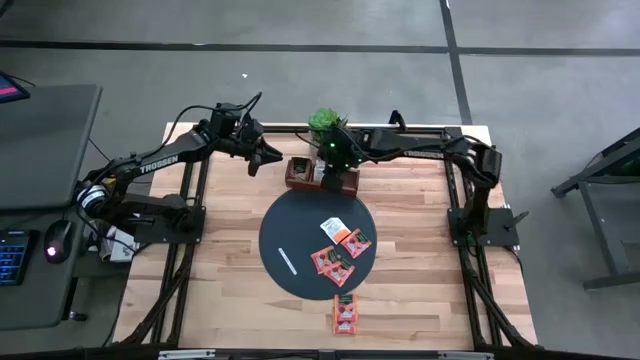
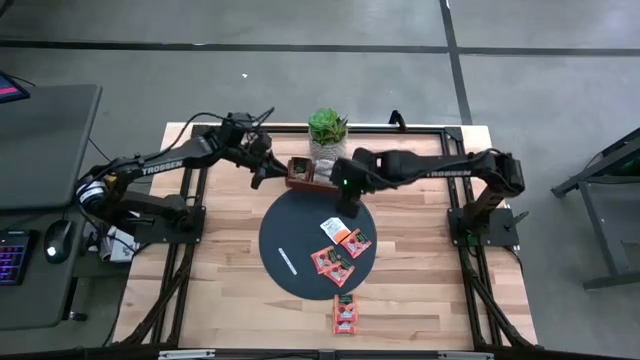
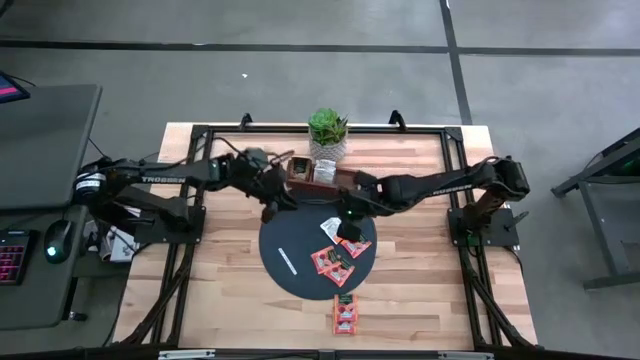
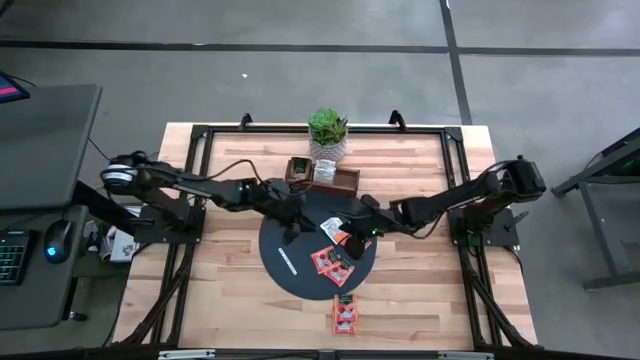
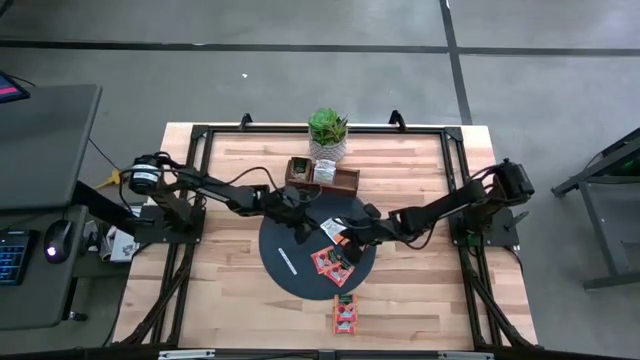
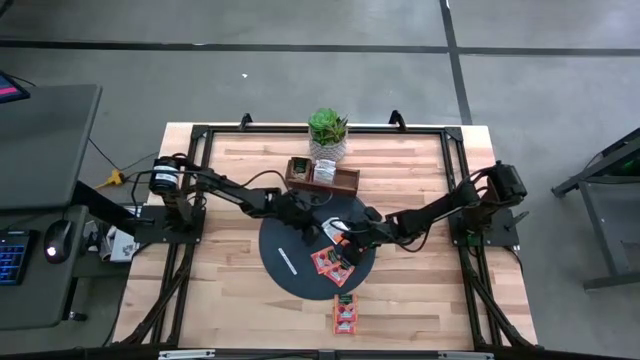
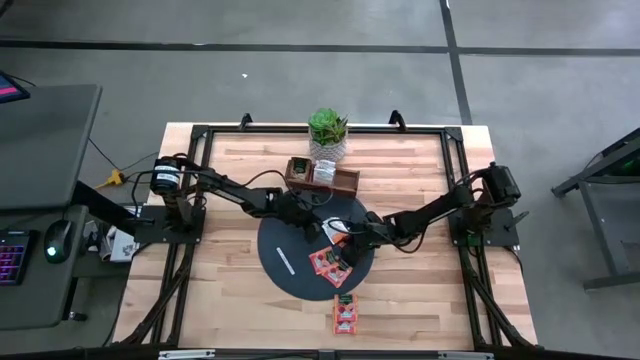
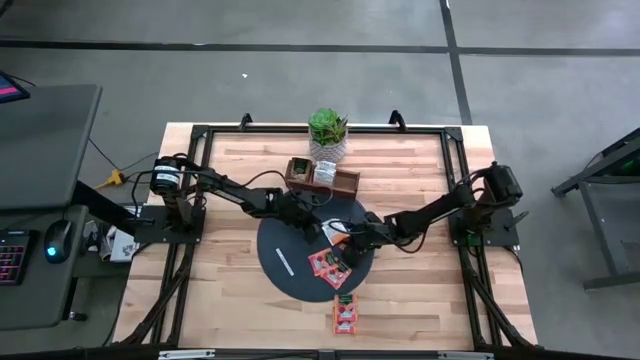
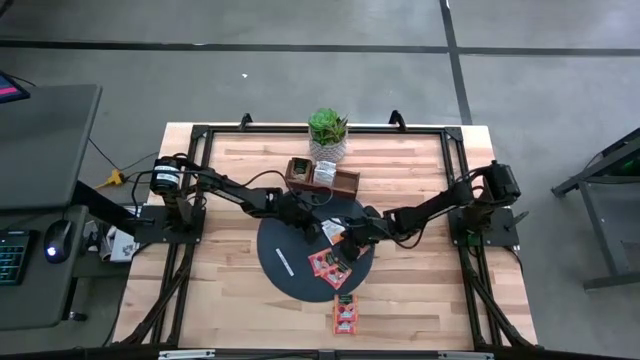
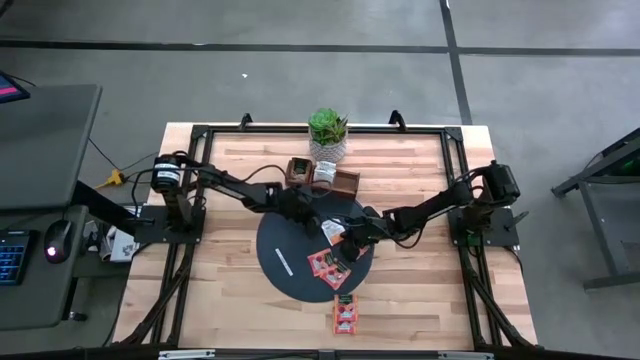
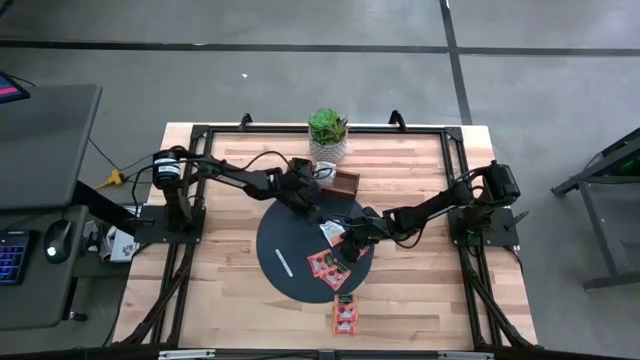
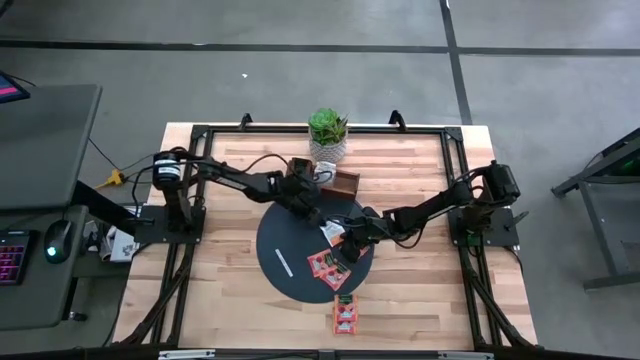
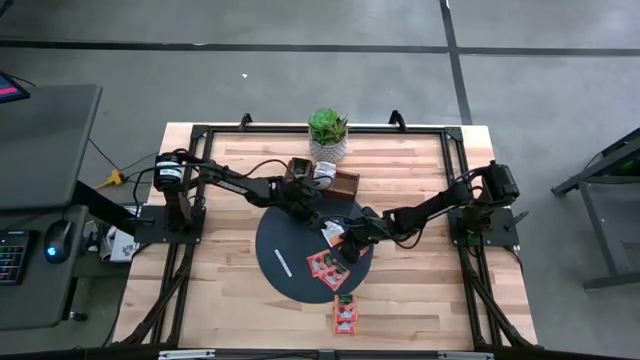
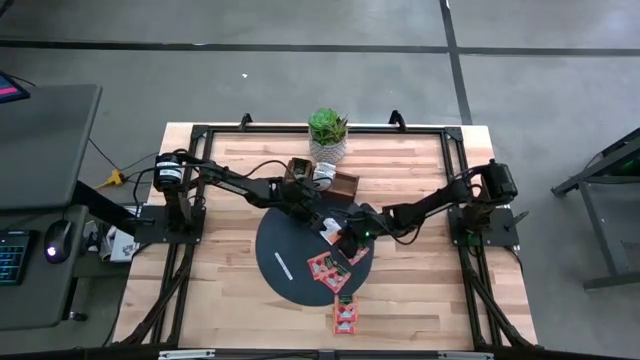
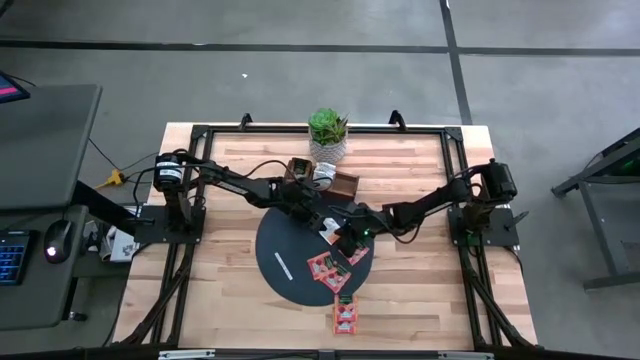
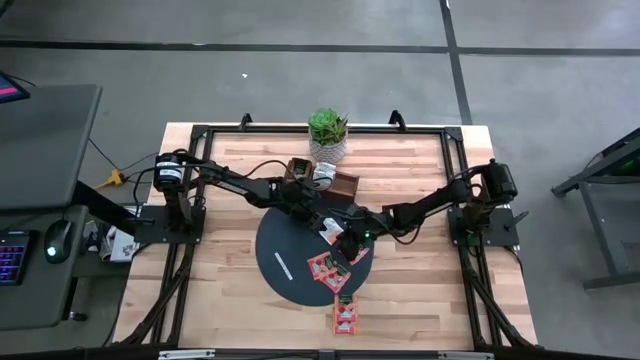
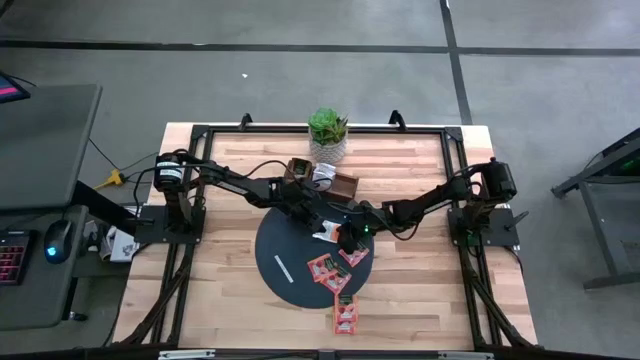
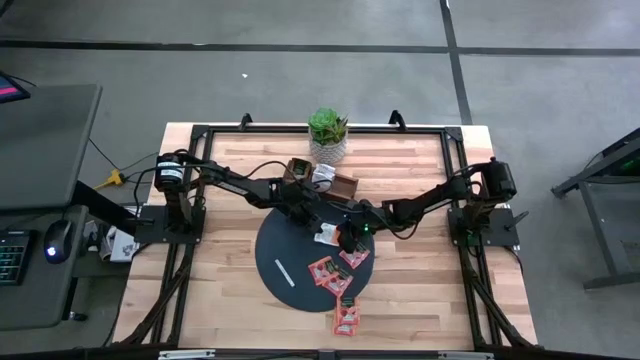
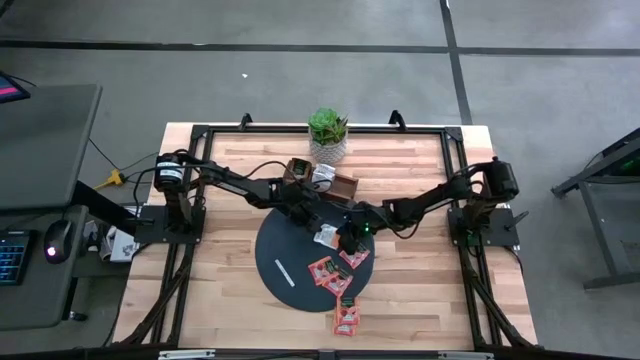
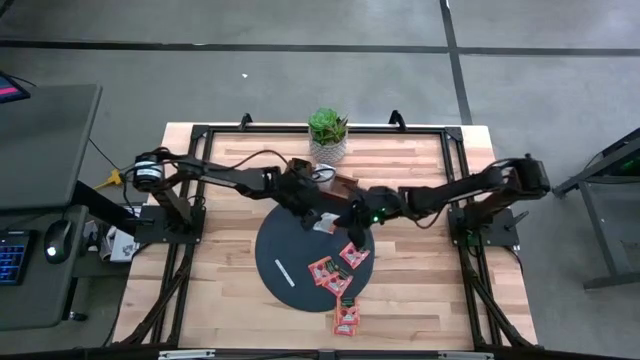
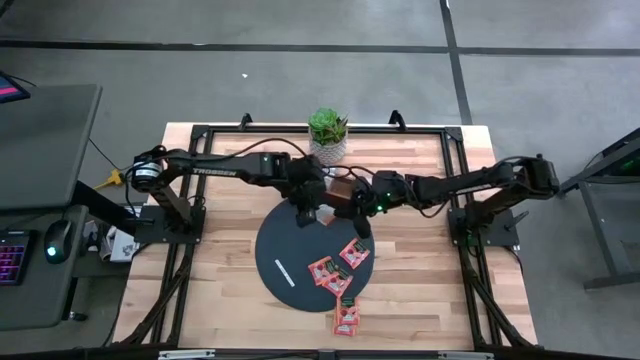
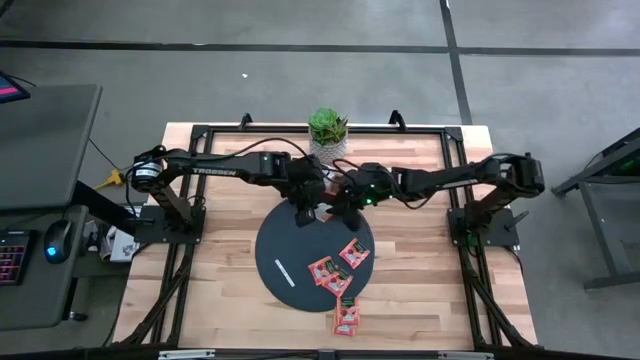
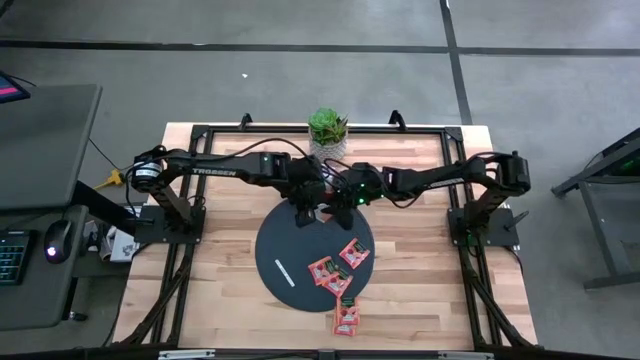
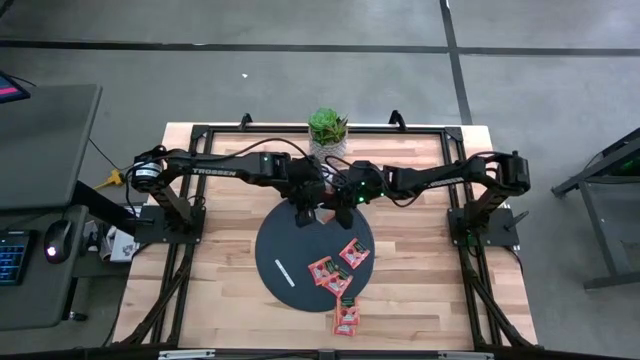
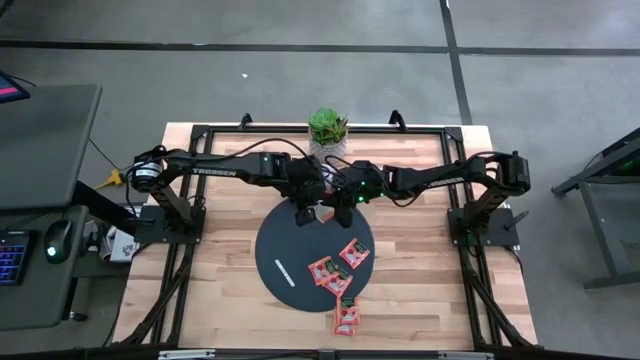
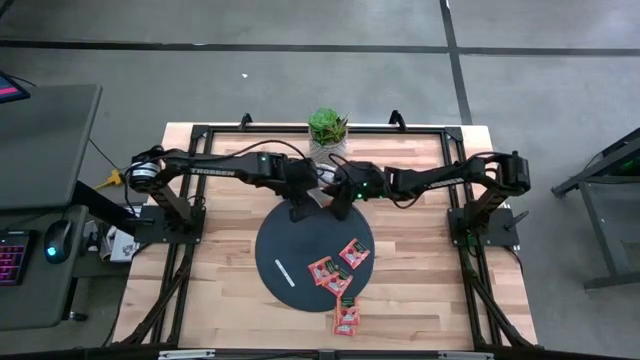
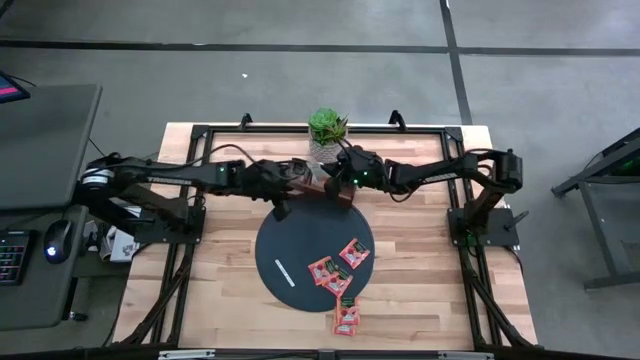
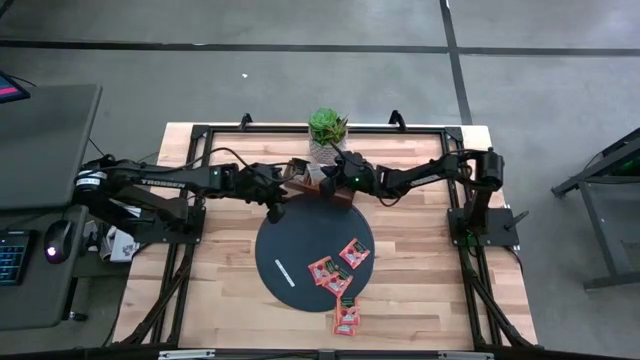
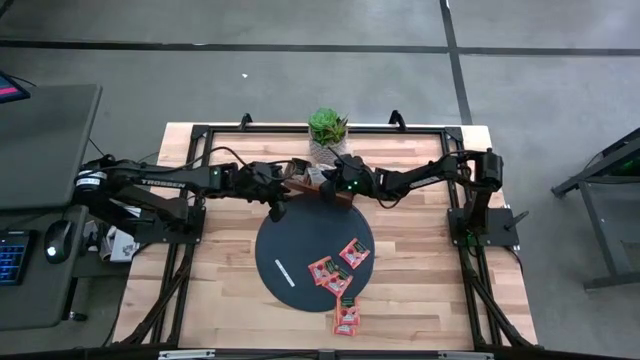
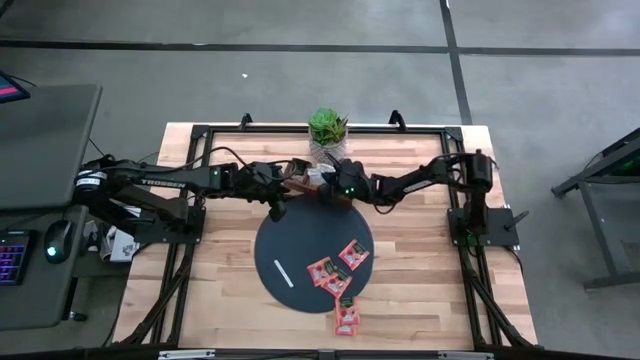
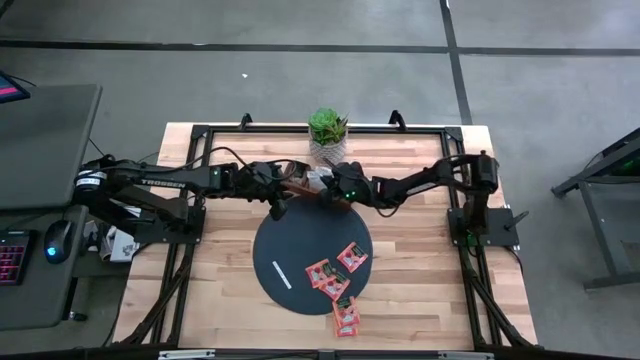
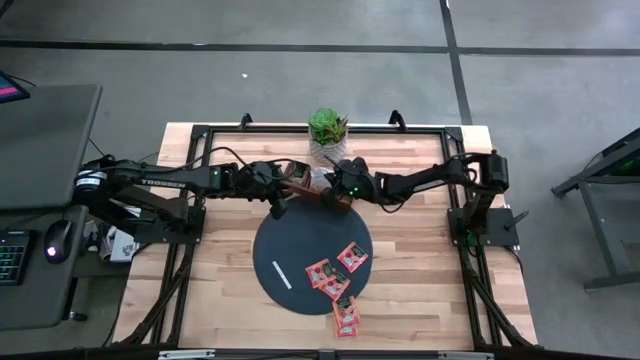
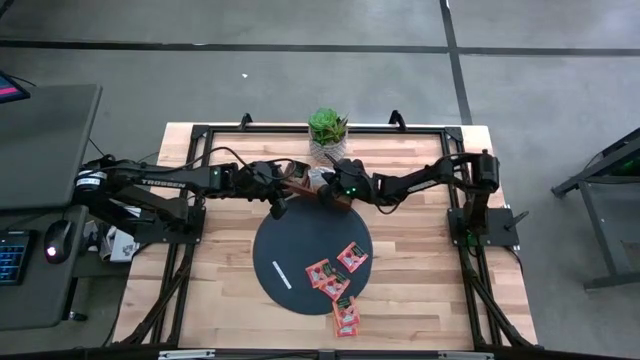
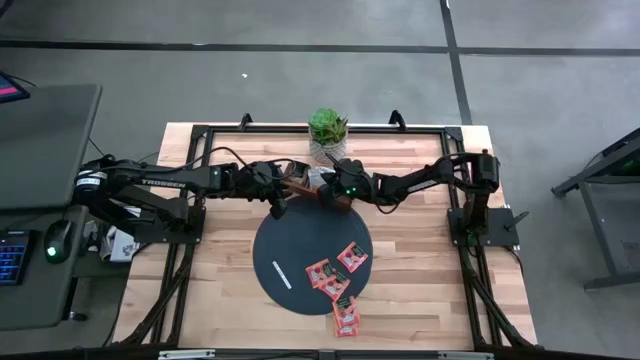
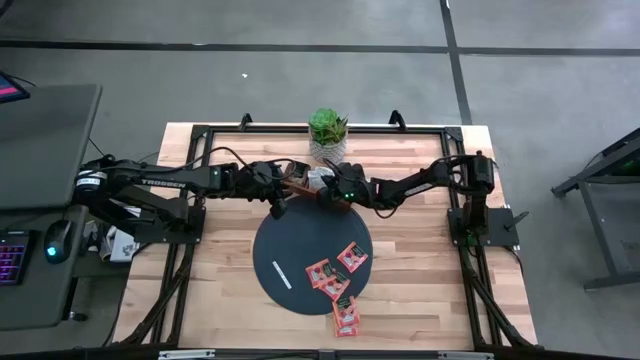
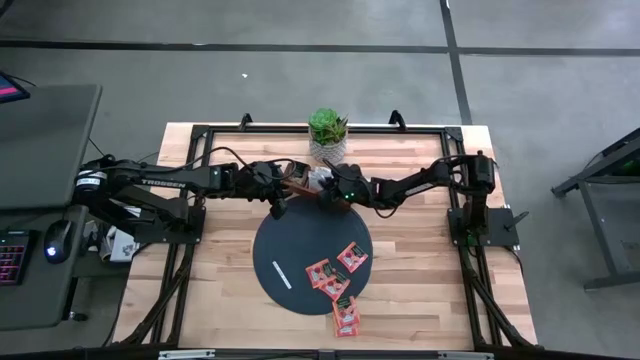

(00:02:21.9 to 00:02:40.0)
Task: Pick & Place Tea
Put the white tea bag into the middle section of the wooden organizer

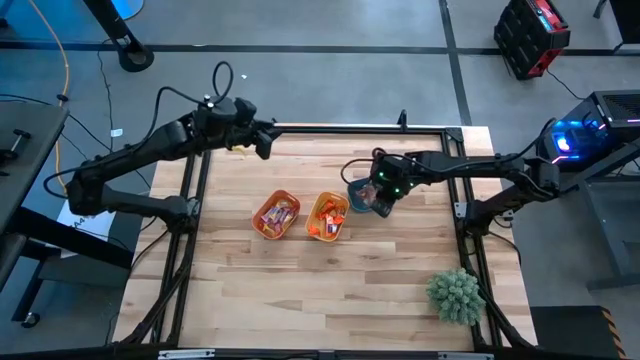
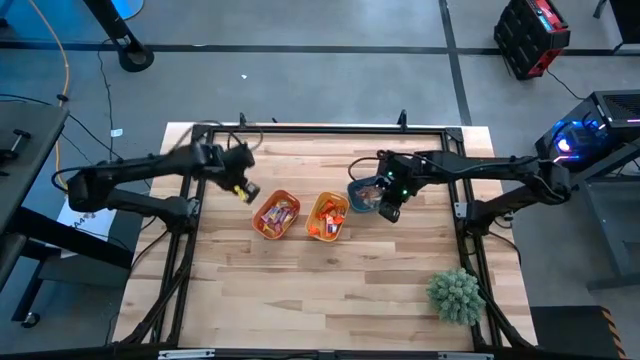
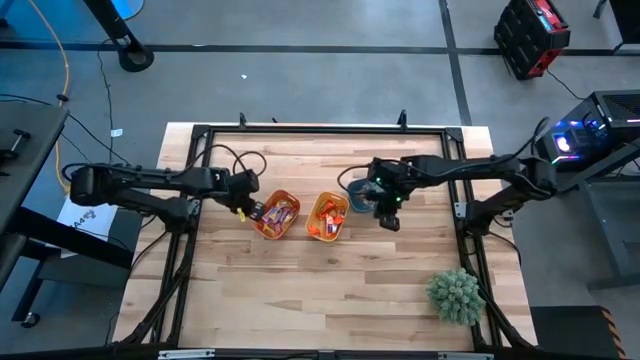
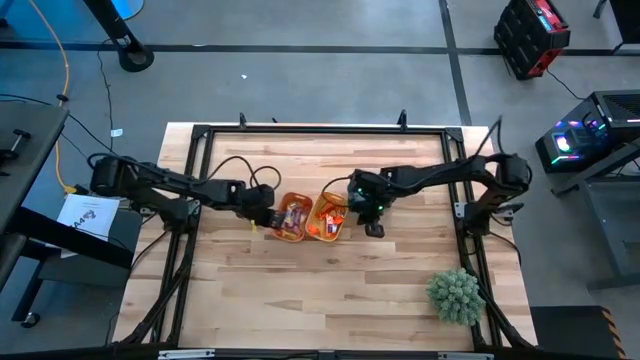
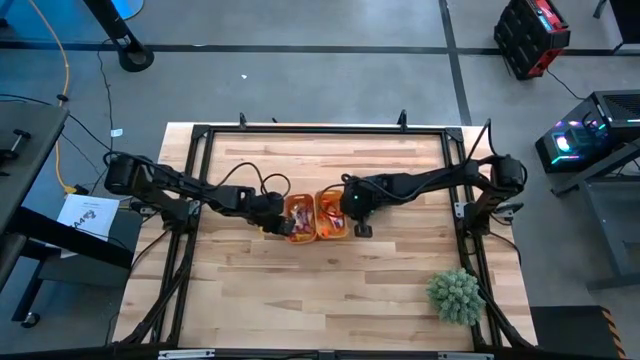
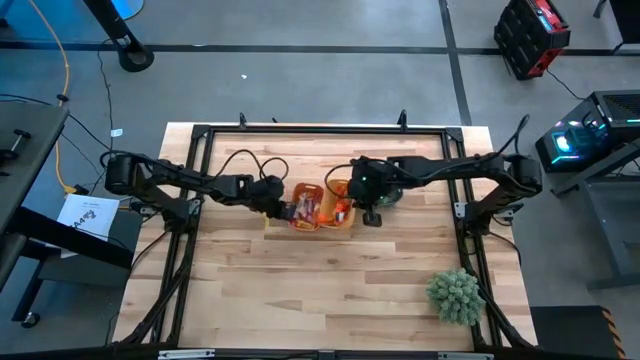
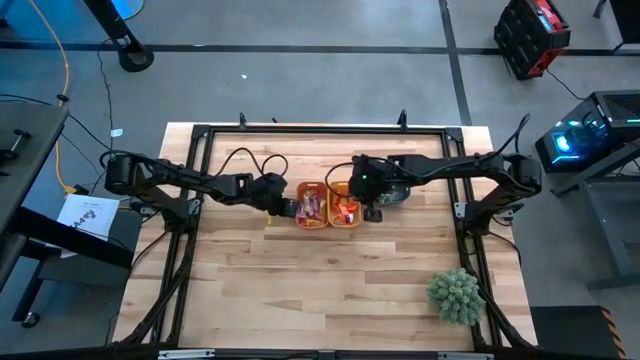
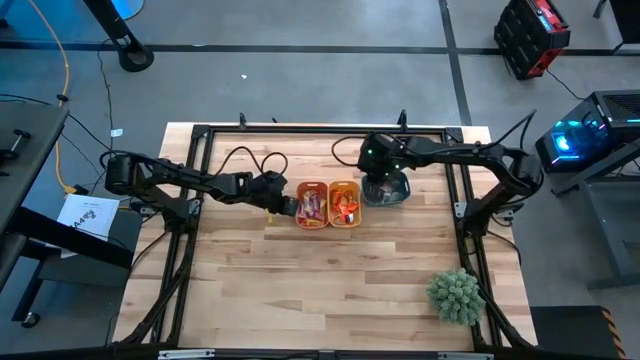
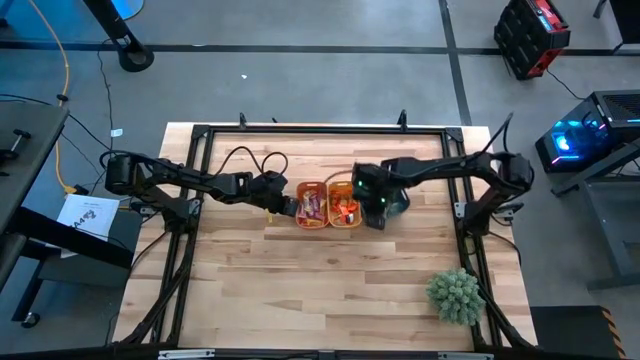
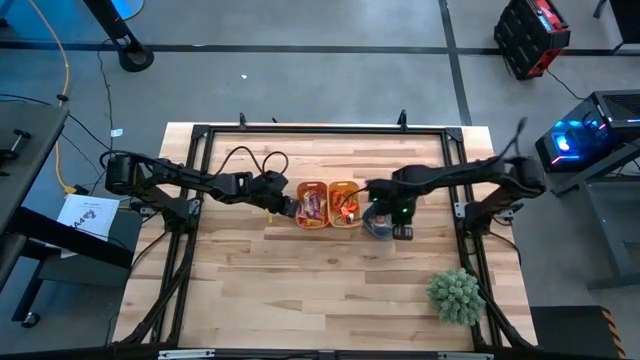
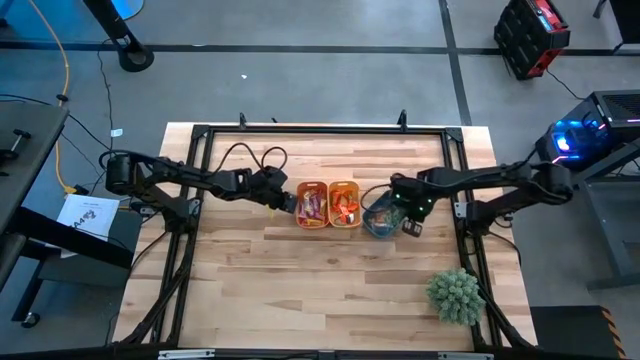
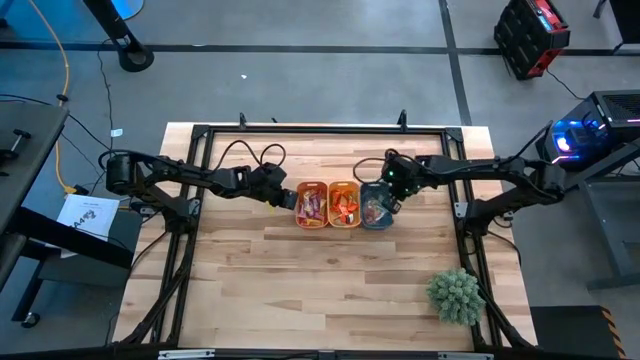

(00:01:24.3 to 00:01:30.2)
Task: Sort candy
Adjust the bins
